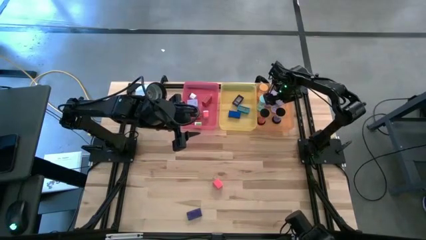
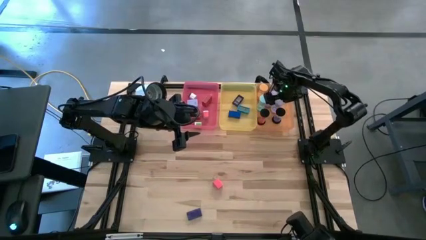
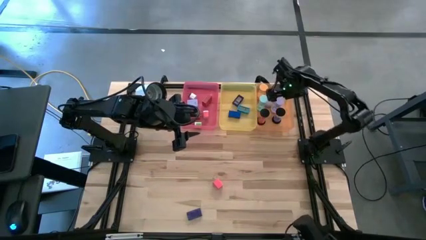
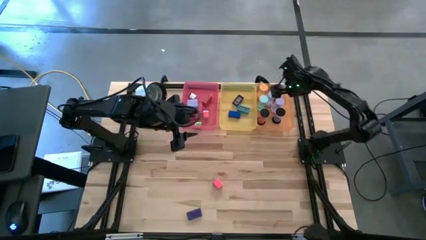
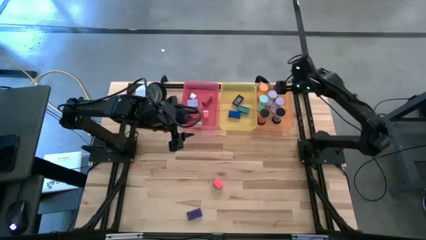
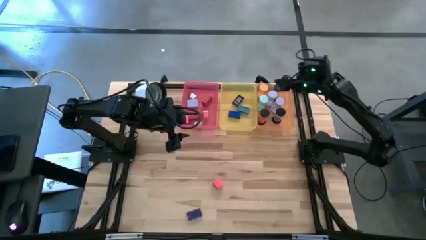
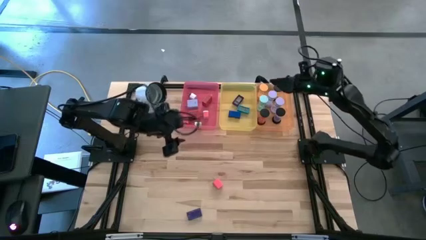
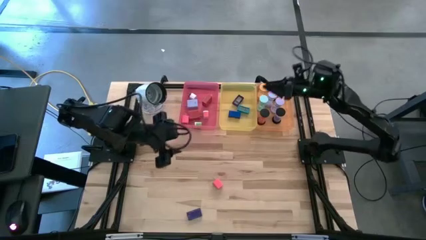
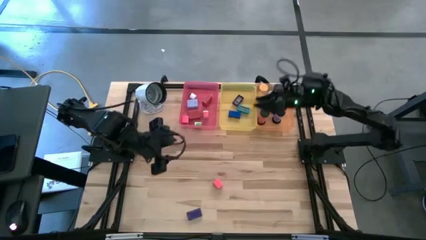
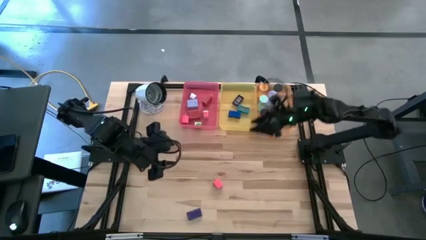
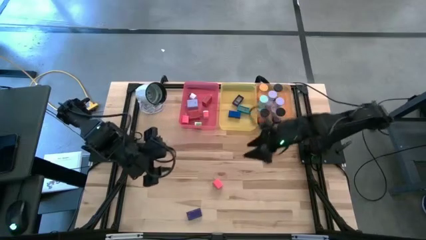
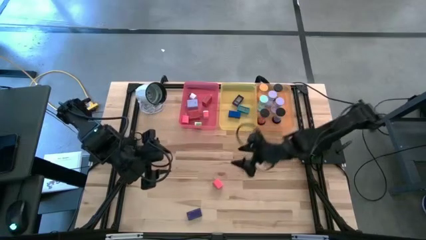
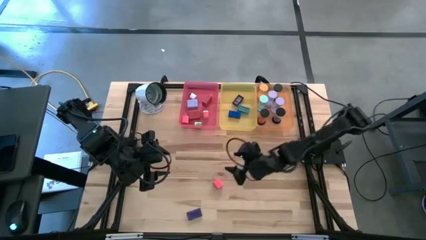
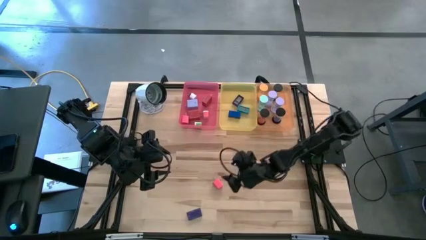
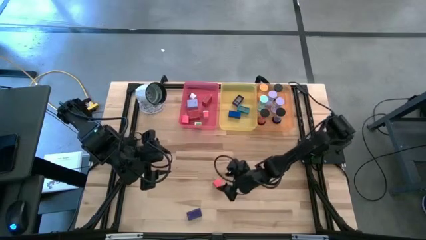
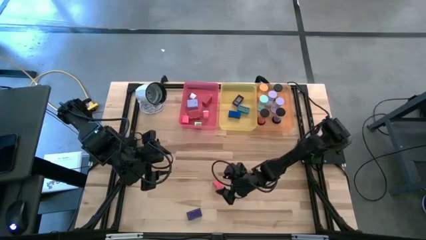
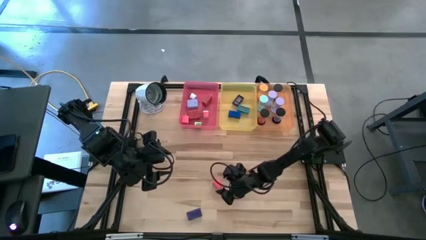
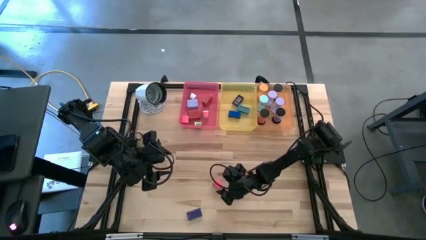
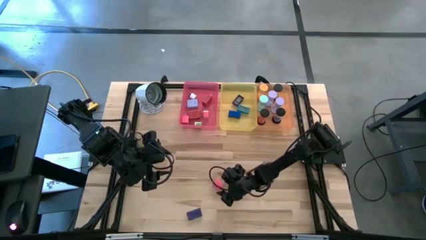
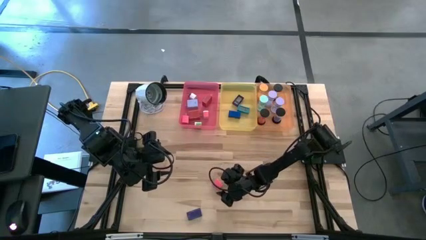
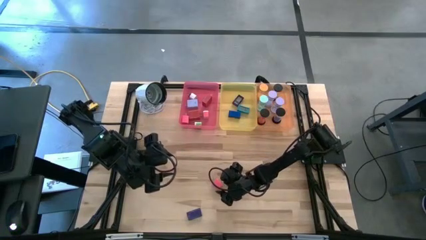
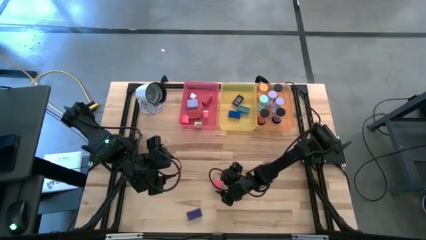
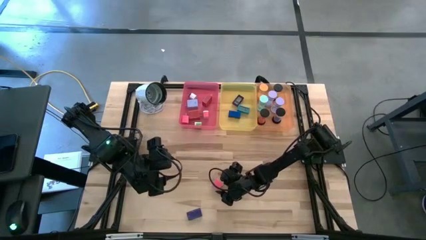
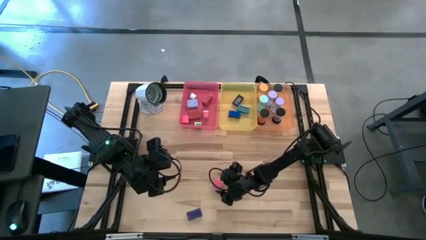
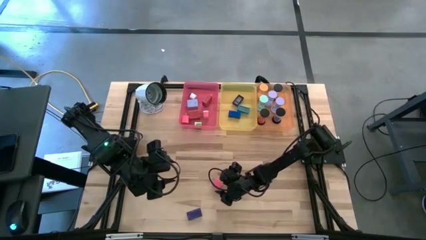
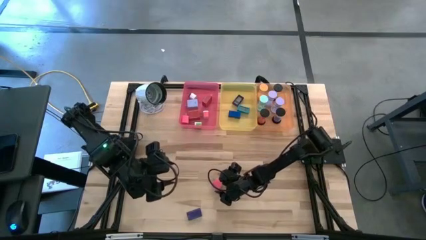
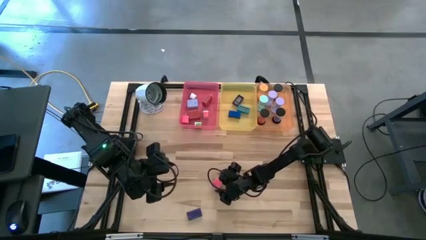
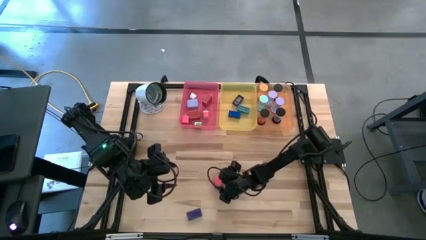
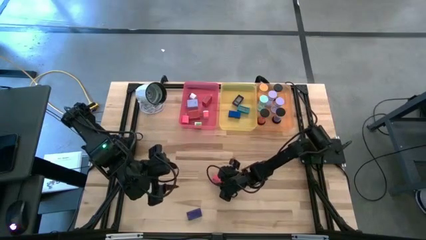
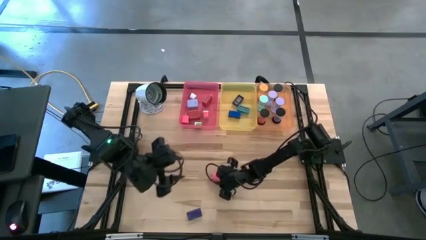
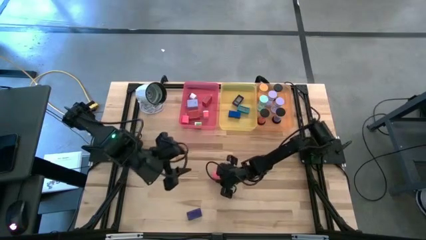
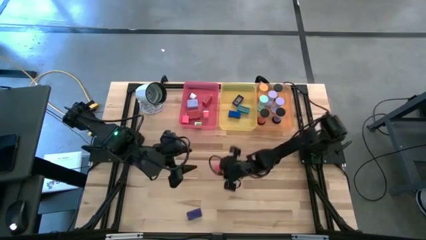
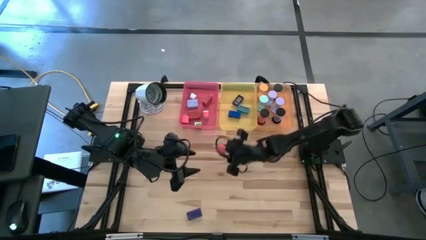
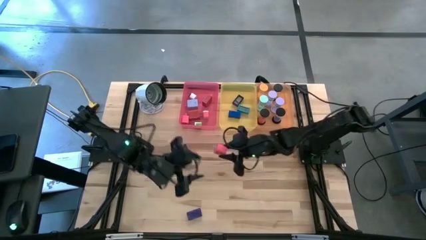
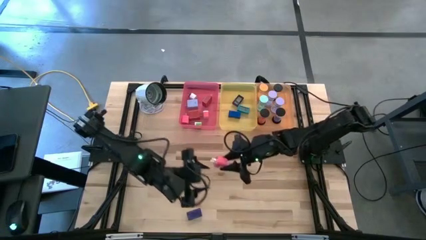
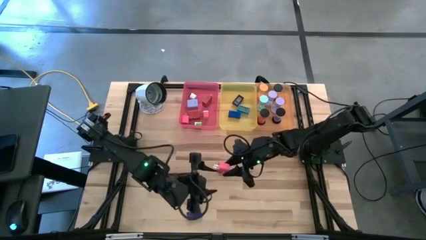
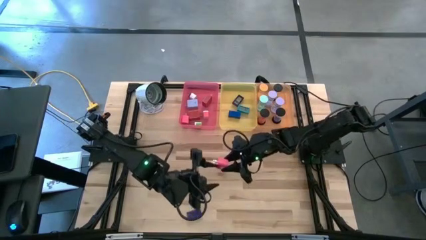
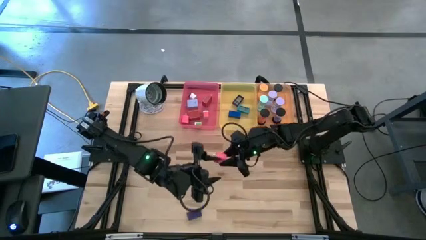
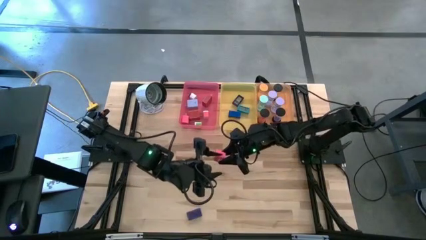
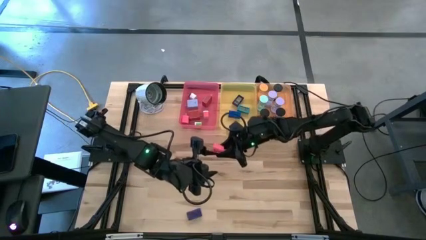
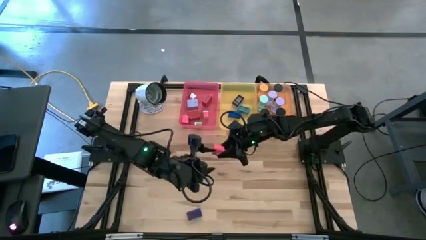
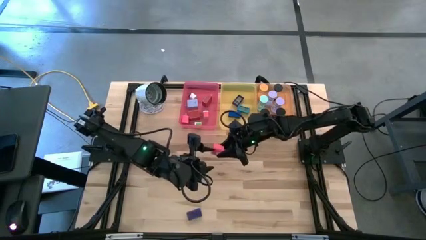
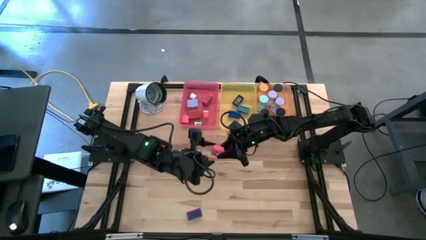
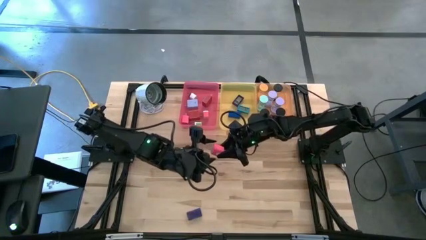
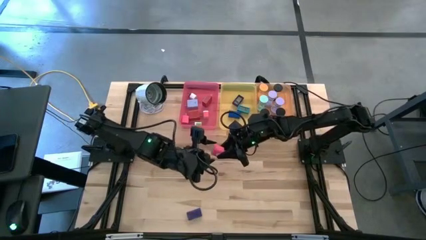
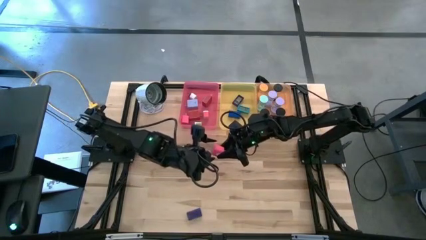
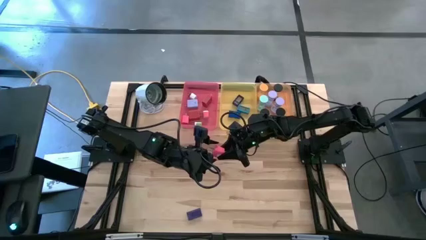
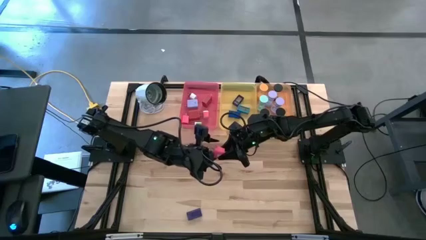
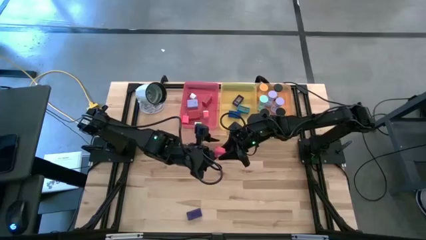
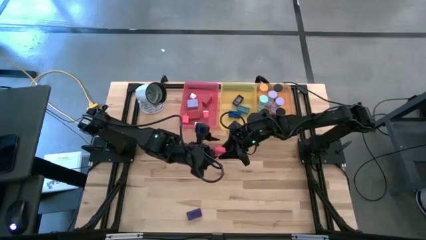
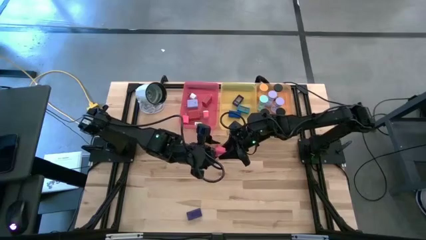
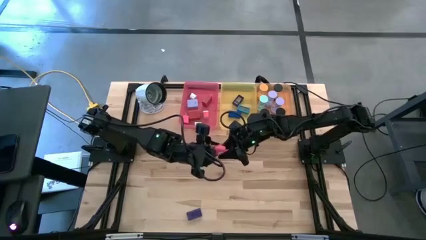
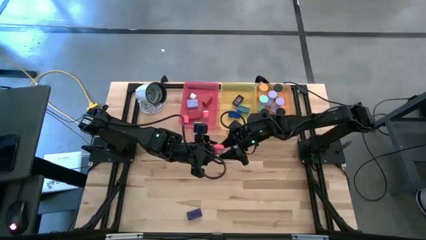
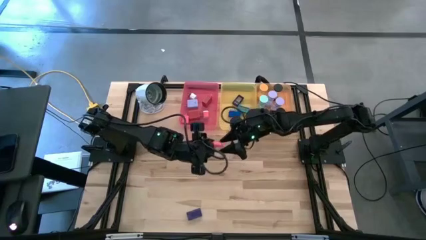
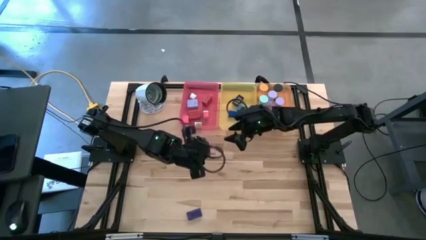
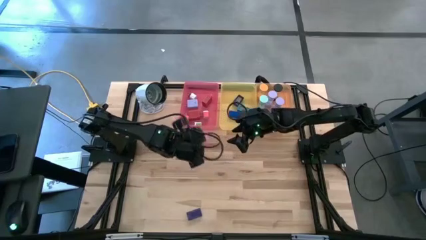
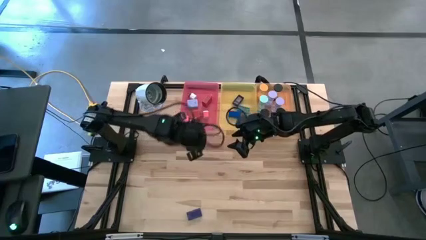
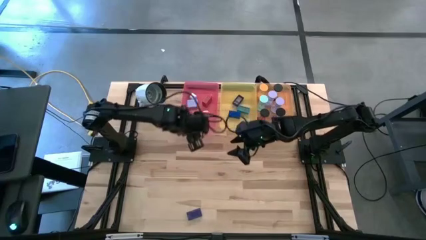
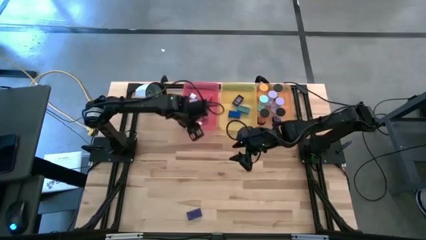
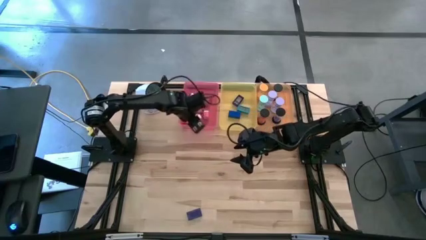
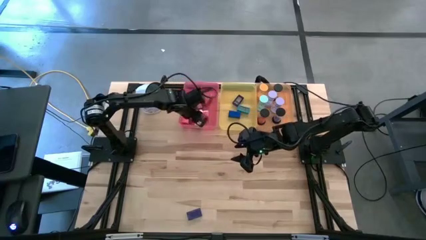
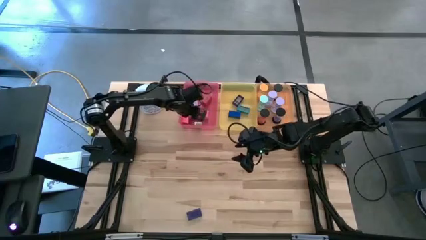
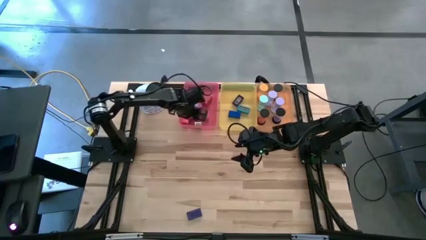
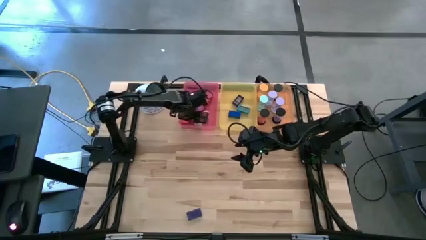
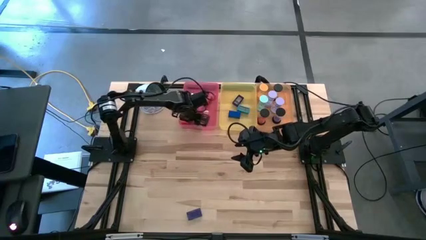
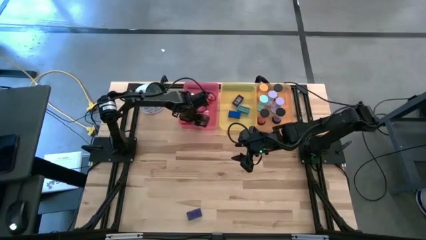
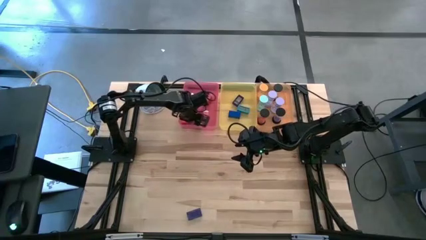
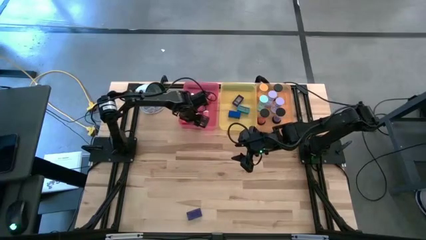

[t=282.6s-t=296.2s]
Task: Pick & Place Office items
Put the pink charger adapter into the red bin

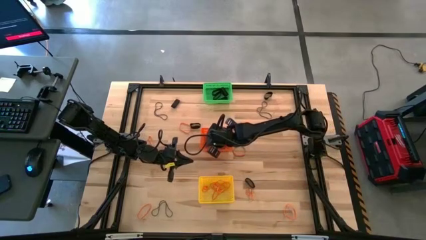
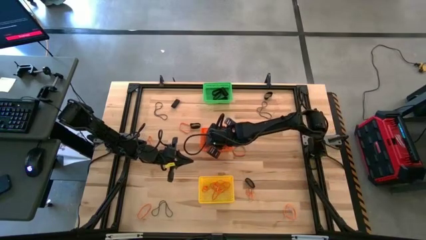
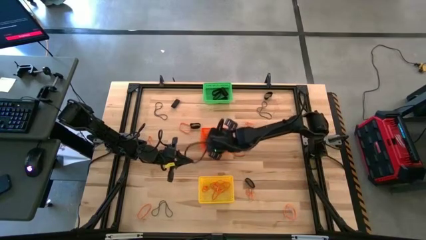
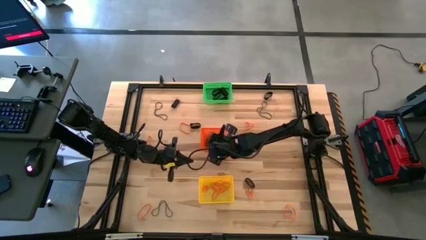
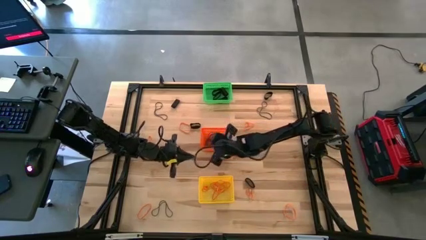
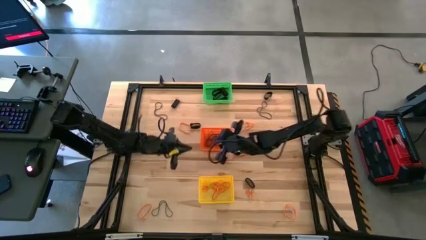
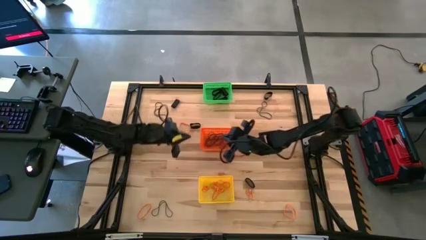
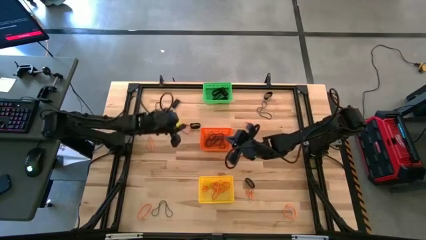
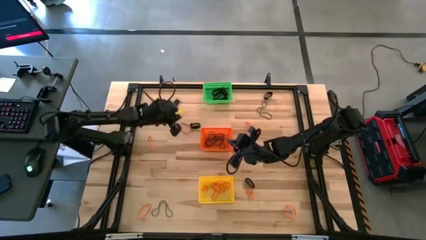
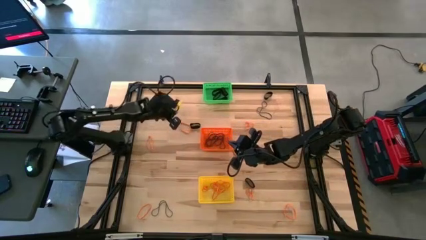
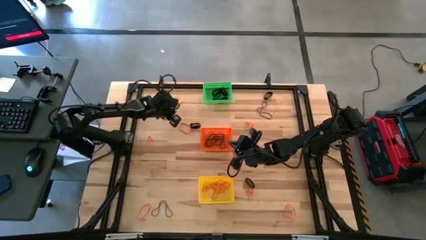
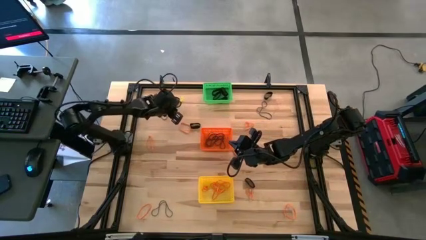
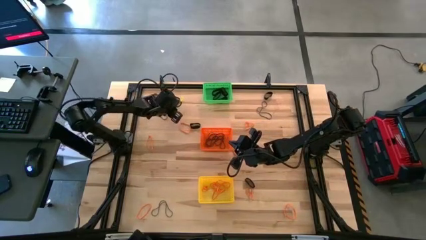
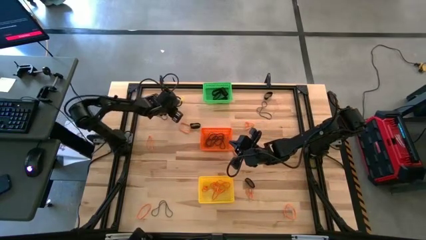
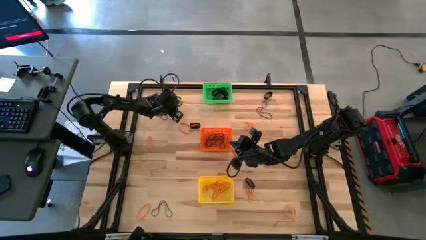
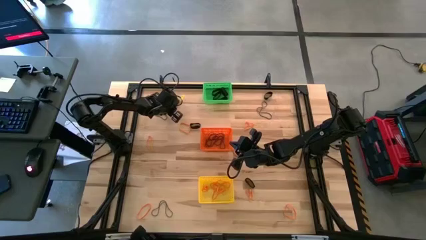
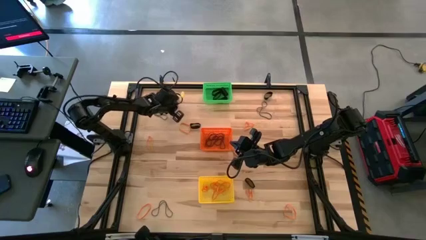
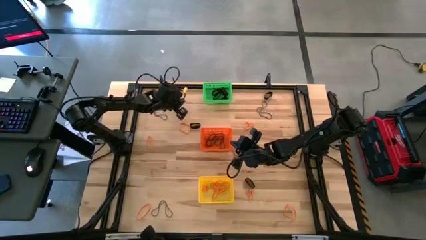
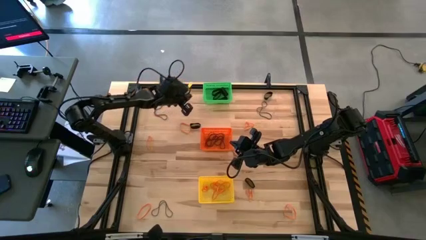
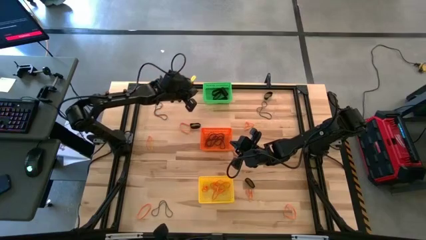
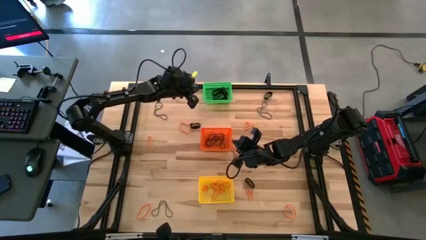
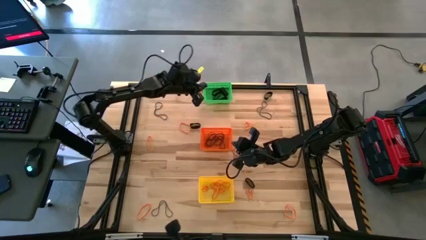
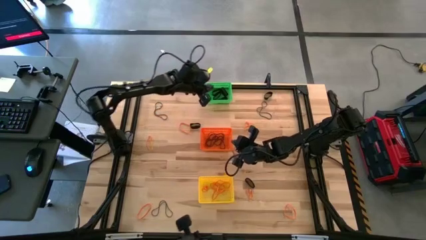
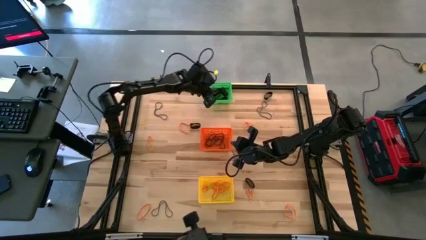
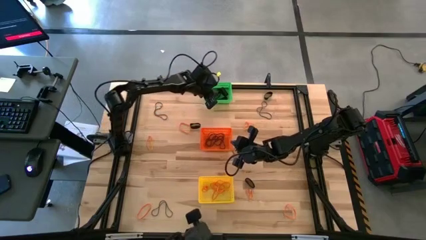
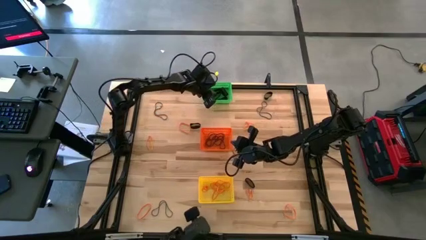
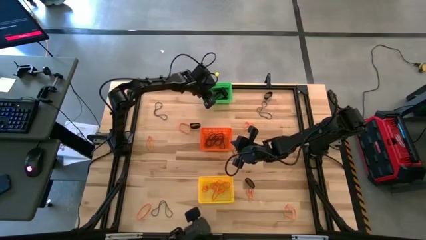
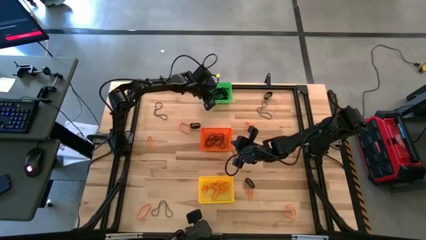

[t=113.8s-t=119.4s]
Task: Sort rubber bands into baskets
Put the black rubber band into the green bin
